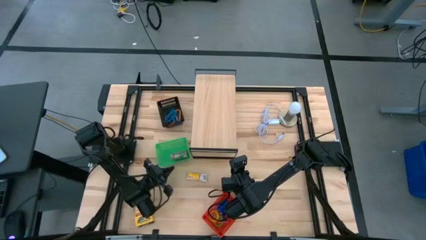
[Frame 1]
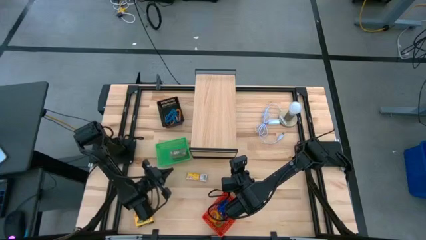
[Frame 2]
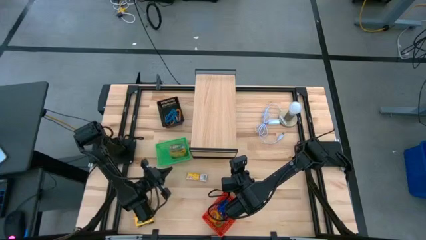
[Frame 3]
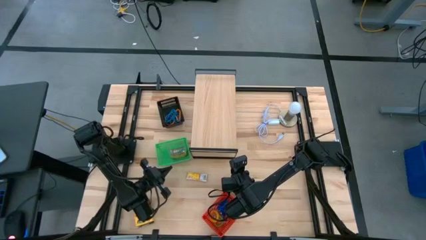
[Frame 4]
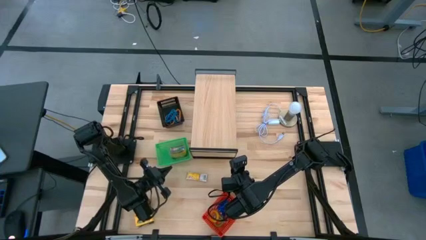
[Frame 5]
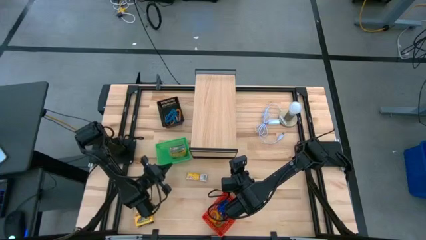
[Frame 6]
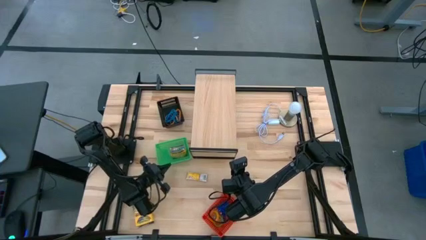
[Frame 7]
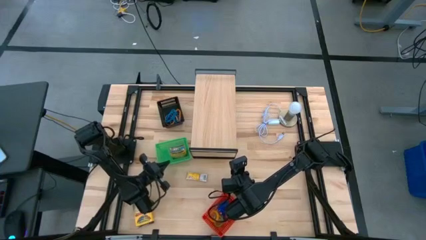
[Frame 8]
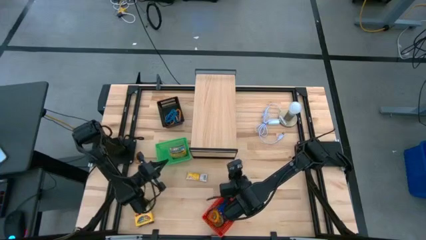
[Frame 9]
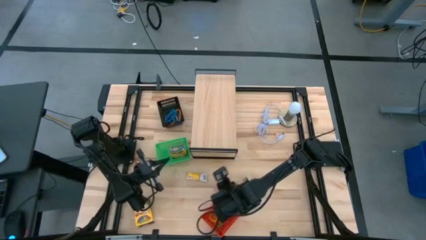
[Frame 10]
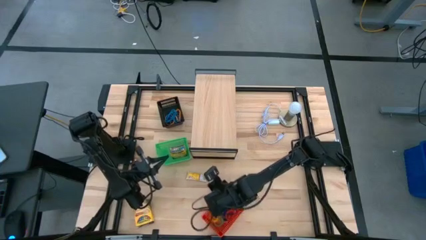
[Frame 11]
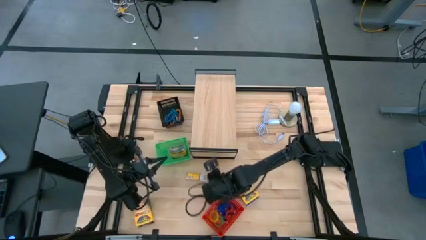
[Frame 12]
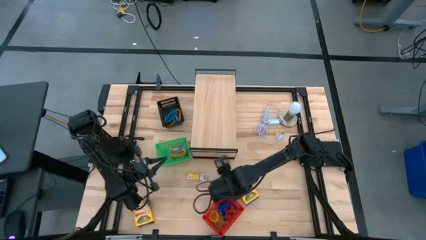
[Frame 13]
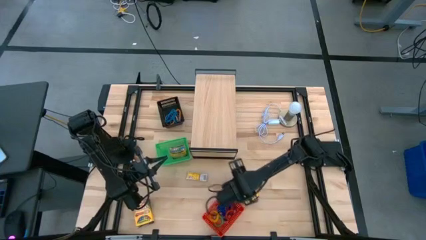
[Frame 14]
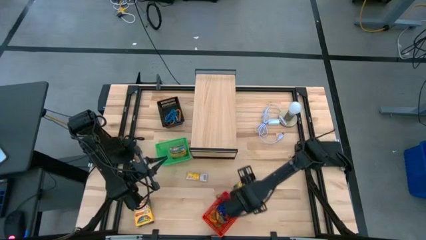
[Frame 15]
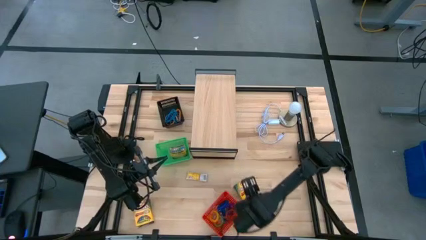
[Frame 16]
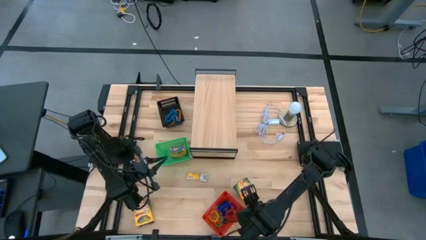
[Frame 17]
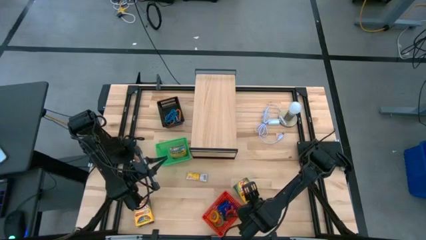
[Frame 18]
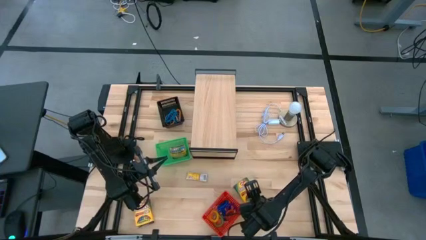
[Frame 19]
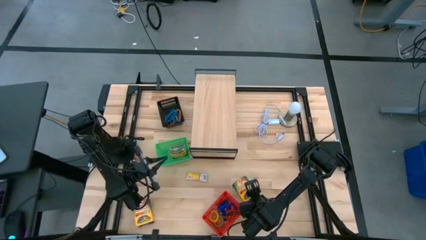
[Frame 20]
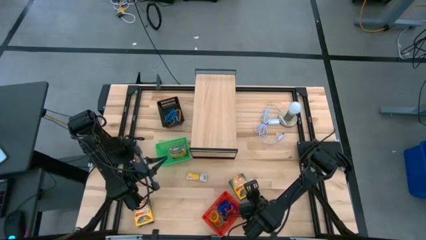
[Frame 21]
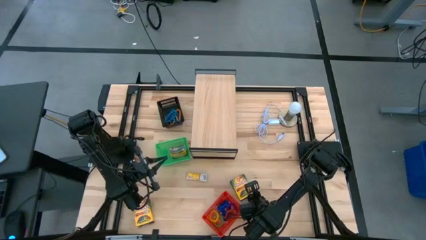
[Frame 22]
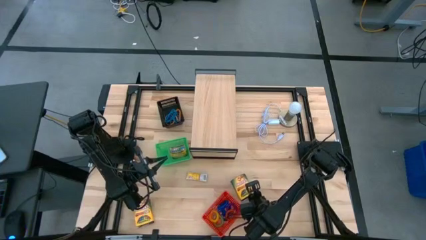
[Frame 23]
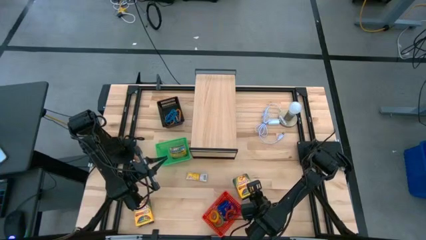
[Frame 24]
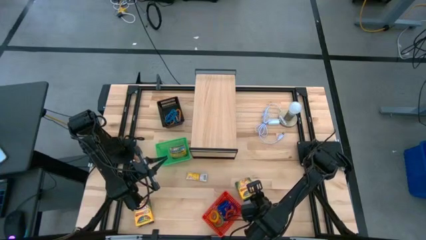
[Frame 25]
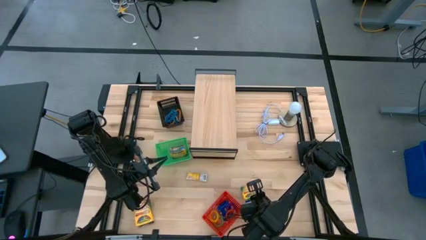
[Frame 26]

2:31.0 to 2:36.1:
Task: Pick & Place Office Desk Supplies
Put the right large yellow crayon box into the green basket

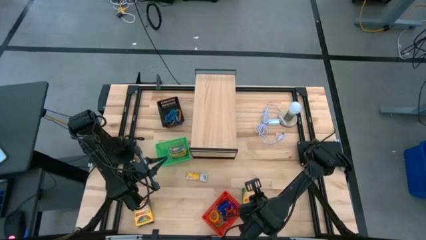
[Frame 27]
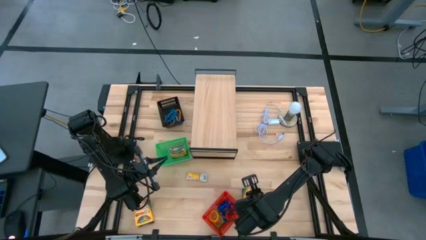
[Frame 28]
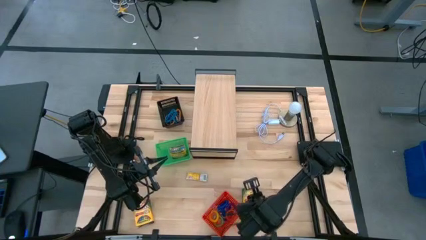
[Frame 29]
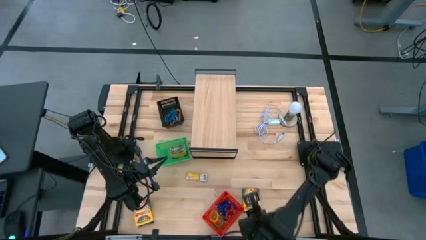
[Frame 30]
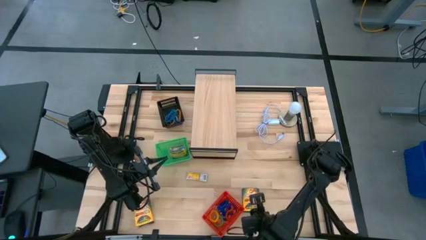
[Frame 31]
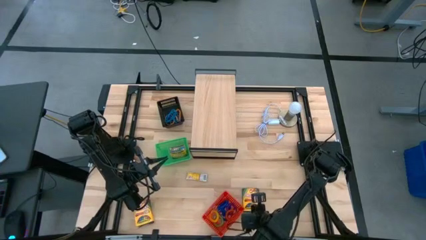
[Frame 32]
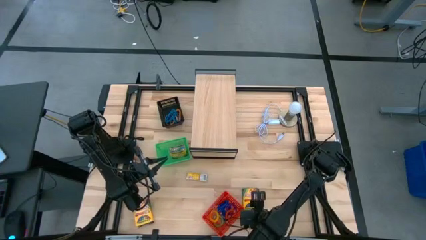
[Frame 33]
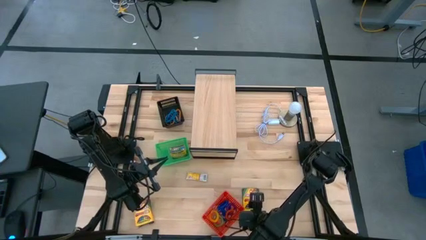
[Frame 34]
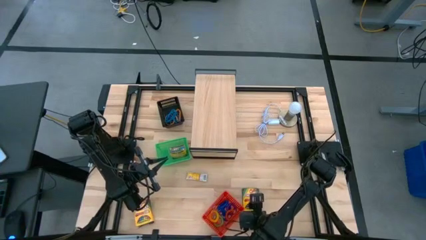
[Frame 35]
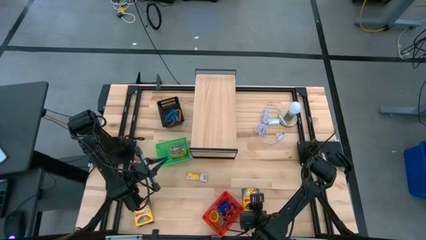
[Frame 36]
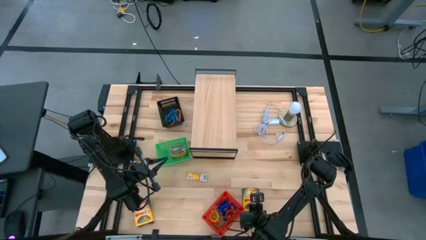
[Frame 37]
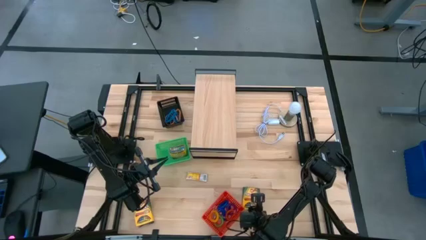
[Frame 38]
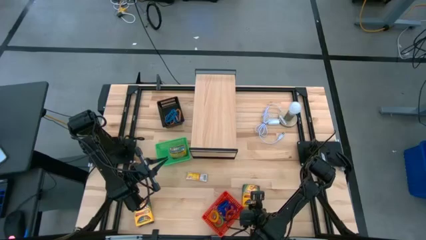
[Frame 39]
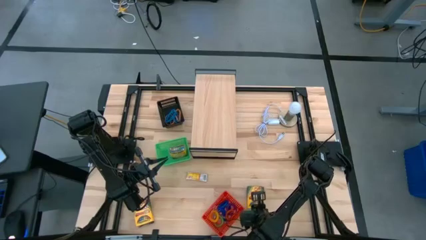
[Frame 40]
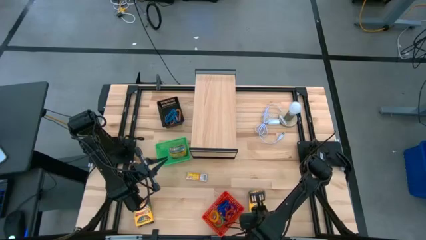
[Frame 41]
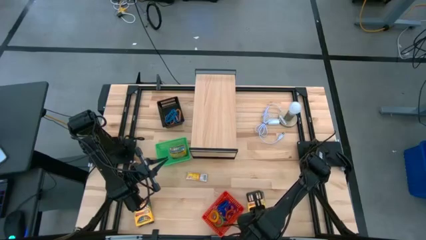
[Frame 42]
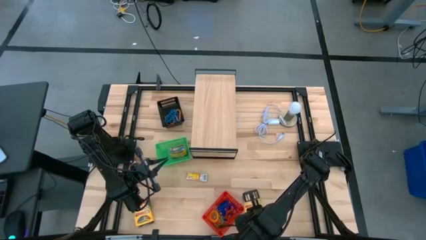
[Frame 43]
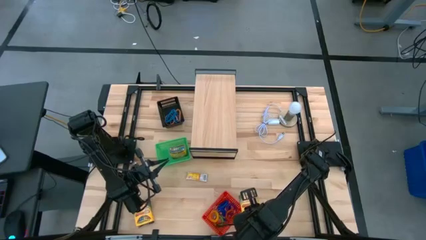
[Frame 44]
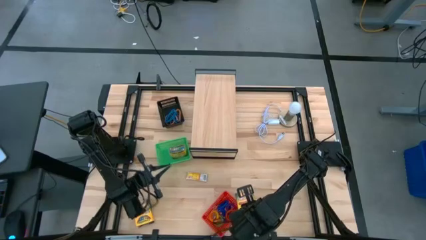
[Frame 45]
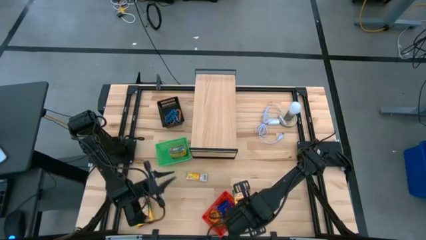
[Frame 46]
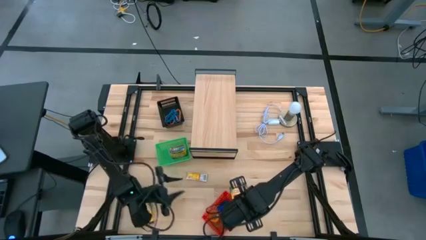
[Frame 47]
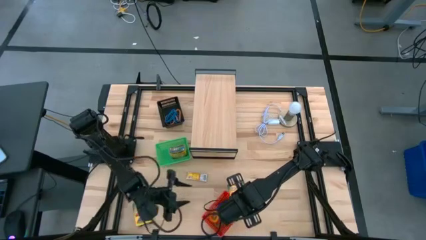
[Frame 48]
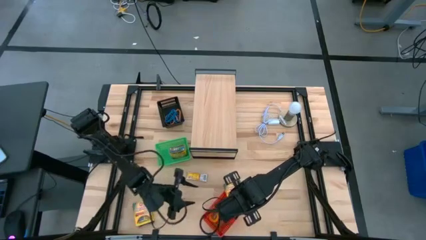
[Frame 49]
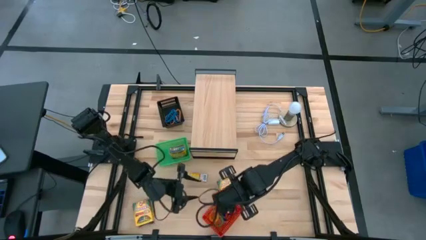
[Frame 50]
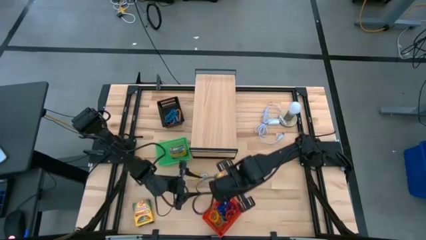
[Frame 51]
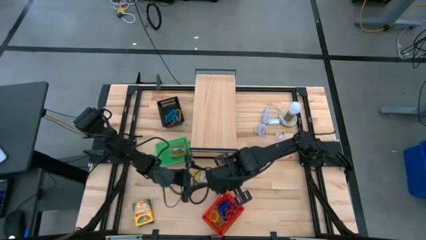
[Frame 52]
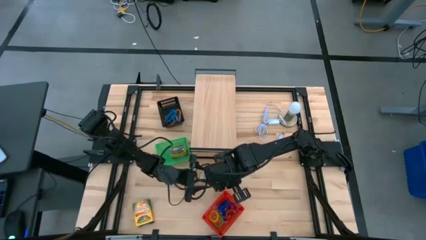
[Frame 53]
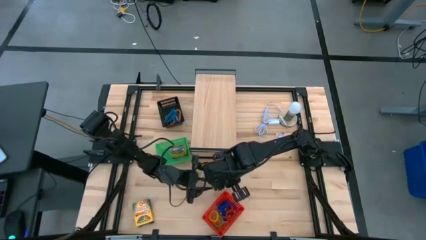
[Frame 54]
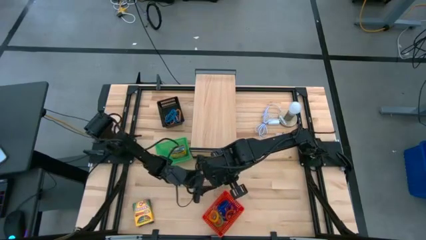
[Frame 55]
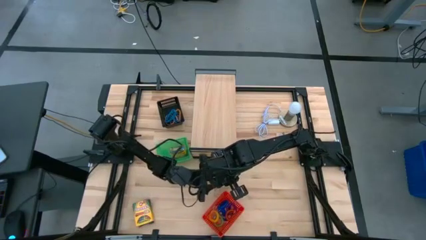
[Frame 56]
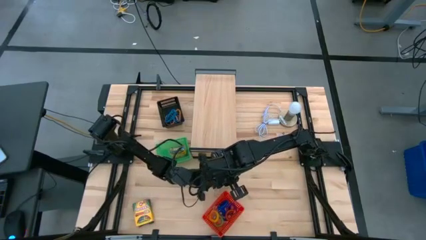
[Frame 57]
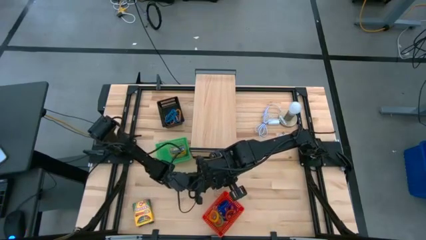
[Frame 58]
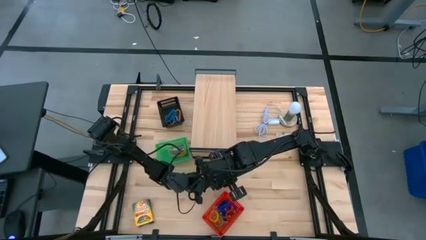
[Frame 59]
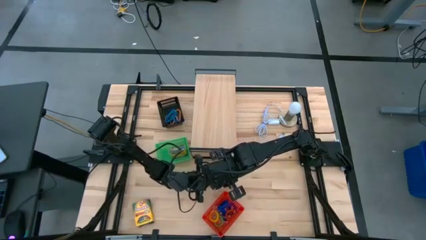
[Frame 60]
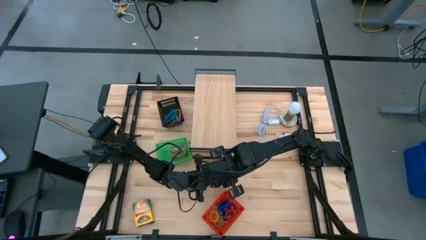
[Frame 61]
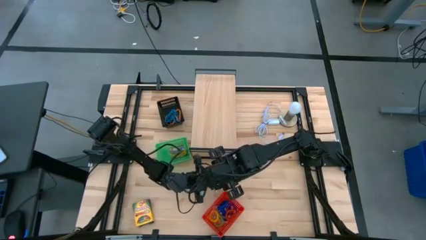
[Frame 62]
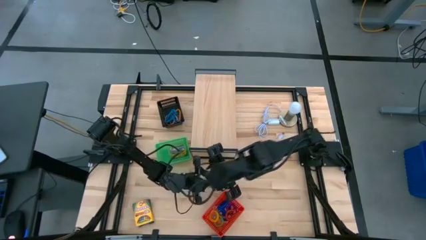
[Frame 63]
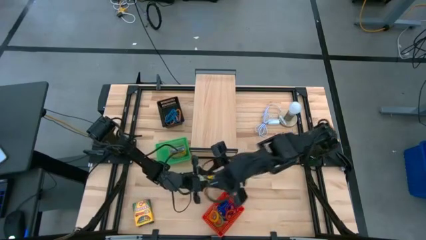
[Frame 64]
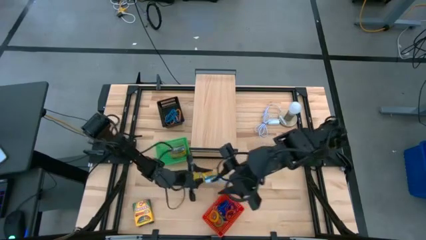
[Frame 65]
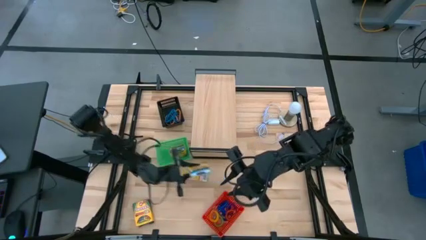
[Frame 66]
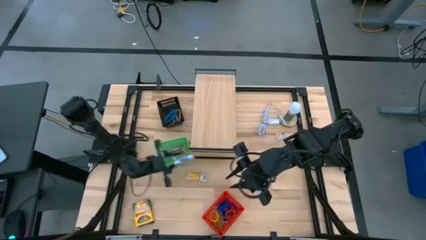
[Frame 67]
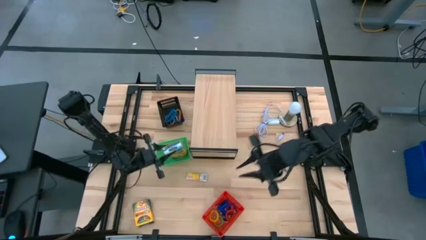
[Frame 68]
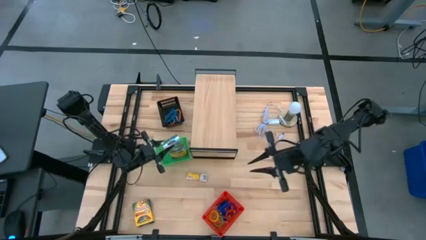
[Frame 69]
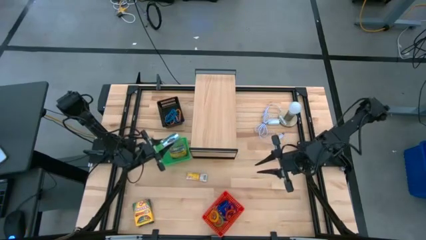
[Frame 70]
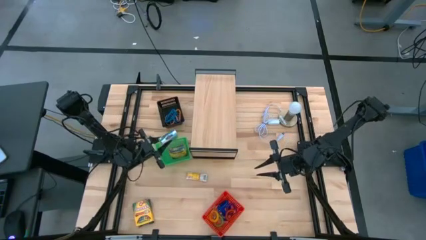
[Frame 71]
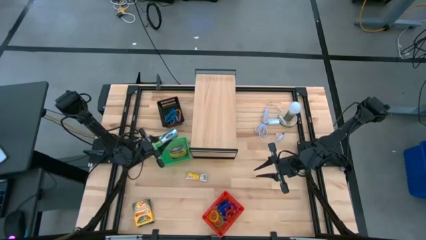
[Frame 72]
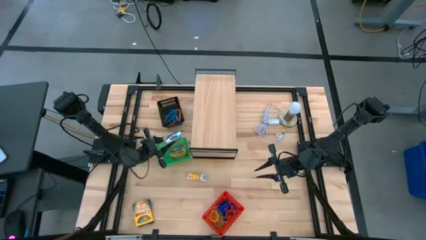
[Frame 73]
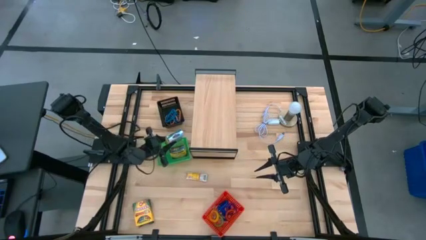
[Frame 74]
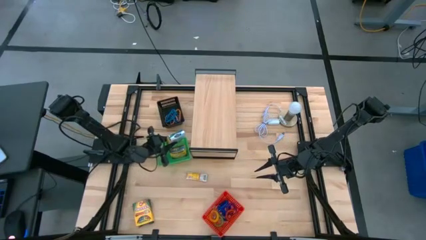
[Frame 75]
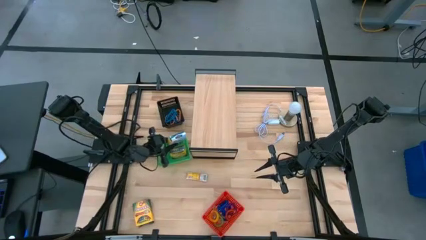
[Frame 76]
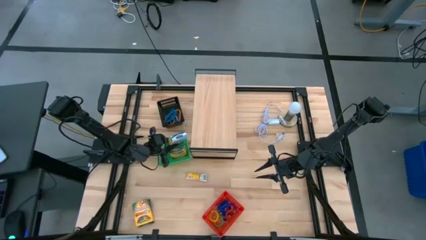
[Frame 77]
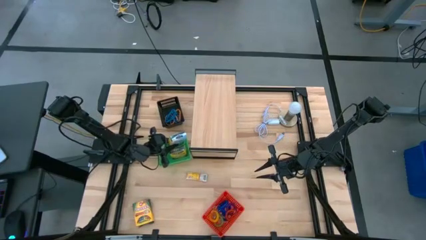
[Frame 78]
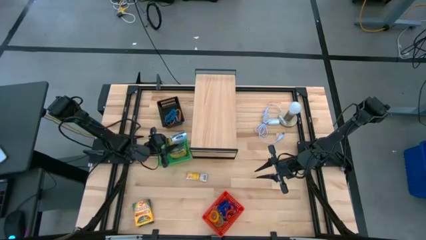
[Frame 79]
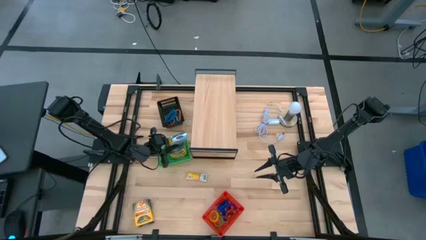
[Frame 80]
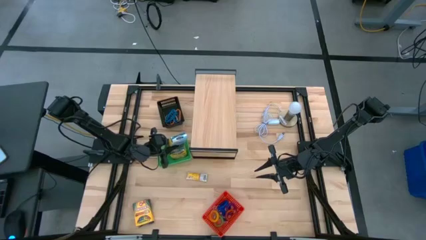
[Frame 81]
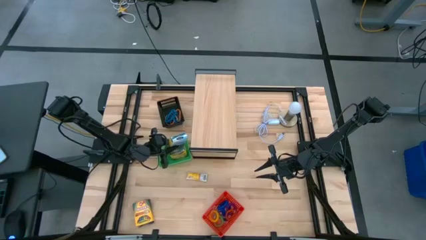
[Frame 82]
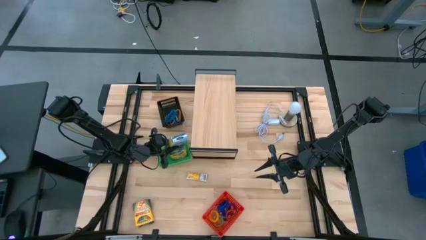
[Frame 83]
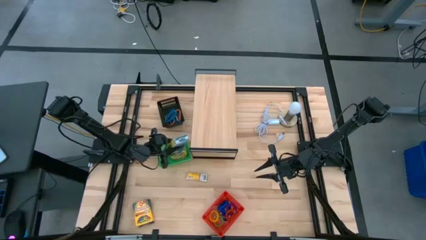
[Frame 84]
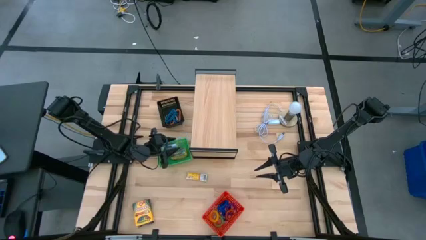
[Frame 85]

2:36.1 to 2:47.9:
Put the right large yellow crayon box into the green basket
